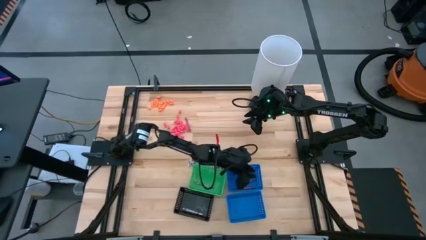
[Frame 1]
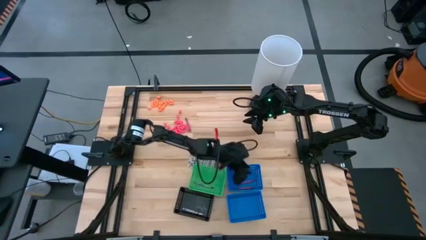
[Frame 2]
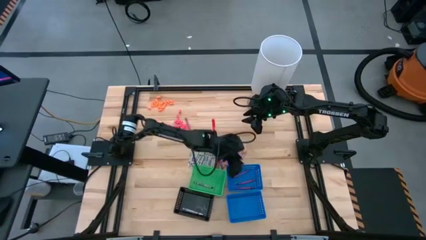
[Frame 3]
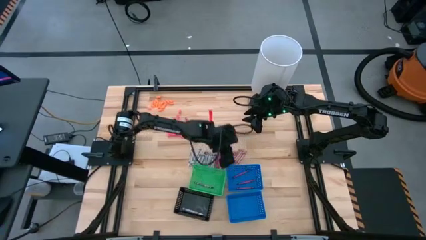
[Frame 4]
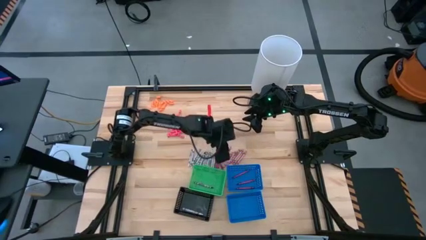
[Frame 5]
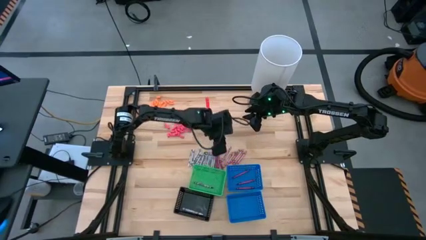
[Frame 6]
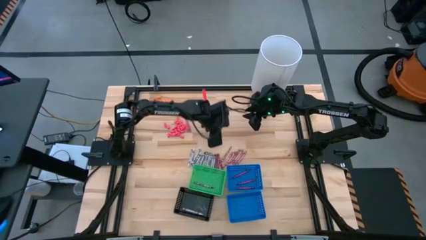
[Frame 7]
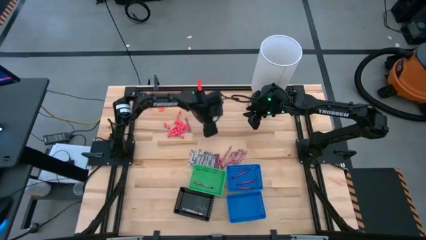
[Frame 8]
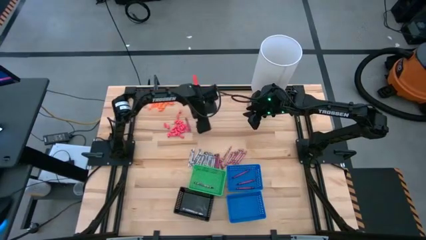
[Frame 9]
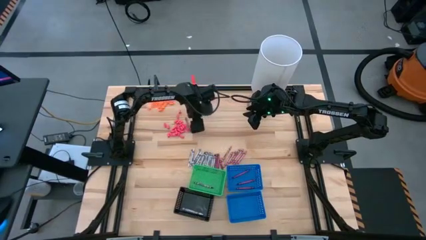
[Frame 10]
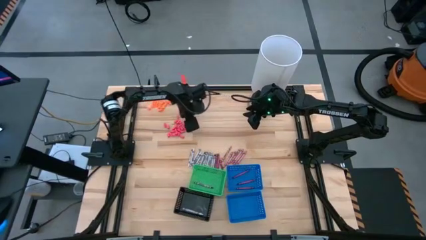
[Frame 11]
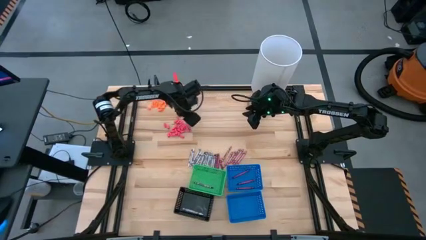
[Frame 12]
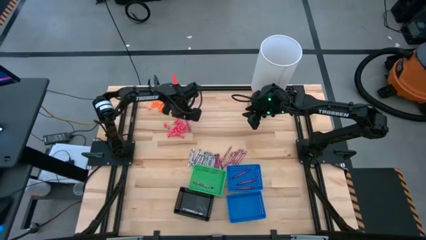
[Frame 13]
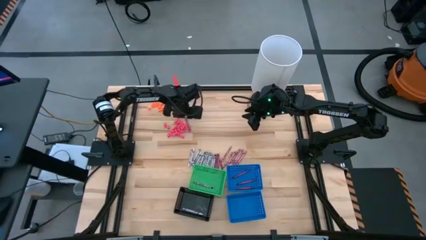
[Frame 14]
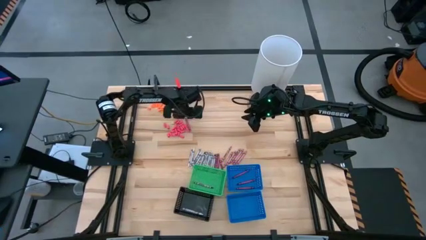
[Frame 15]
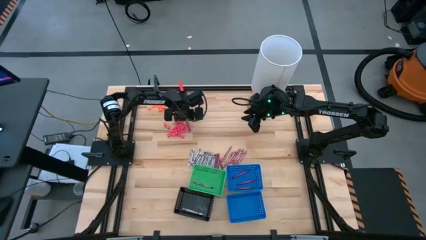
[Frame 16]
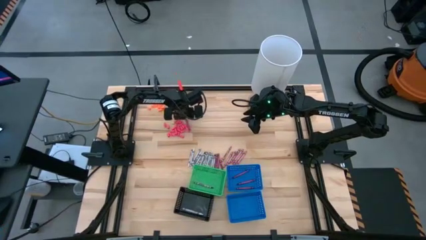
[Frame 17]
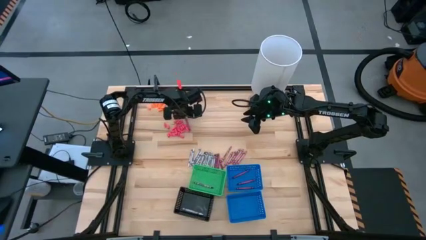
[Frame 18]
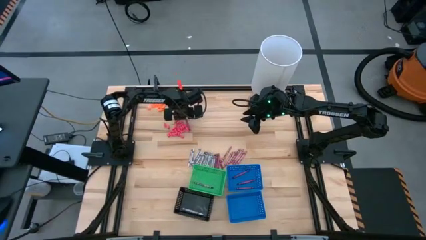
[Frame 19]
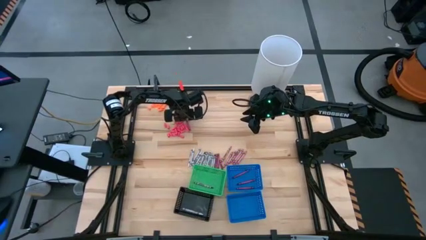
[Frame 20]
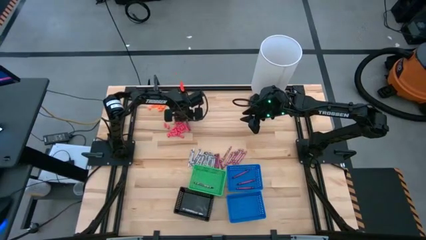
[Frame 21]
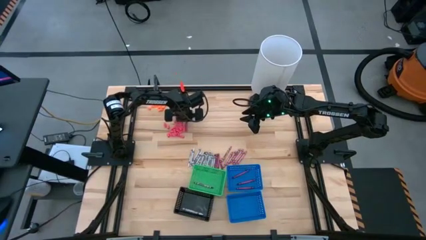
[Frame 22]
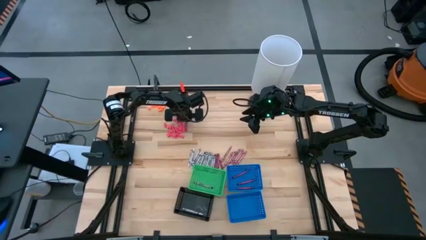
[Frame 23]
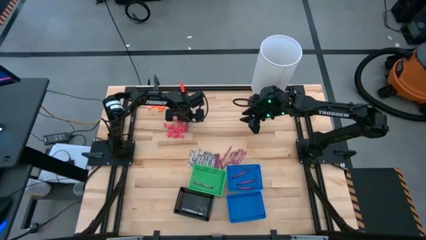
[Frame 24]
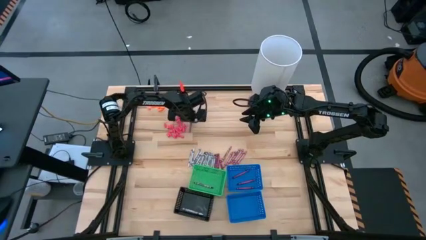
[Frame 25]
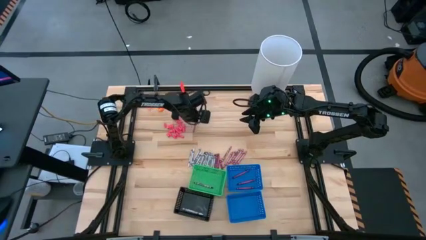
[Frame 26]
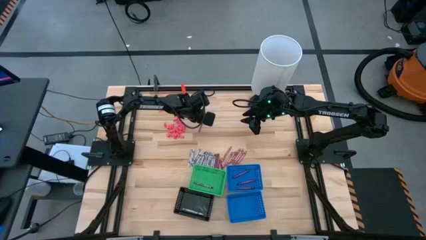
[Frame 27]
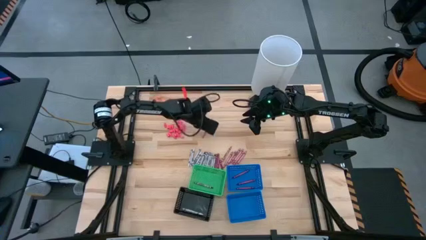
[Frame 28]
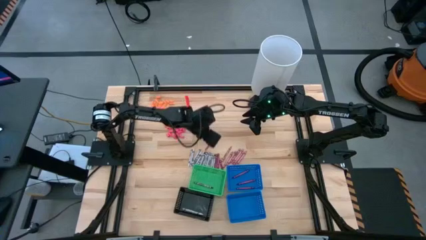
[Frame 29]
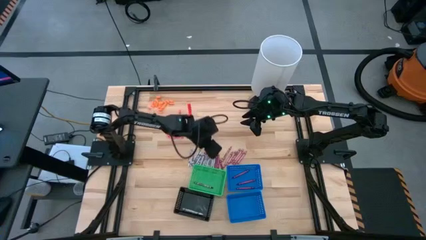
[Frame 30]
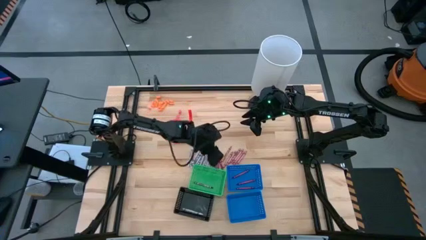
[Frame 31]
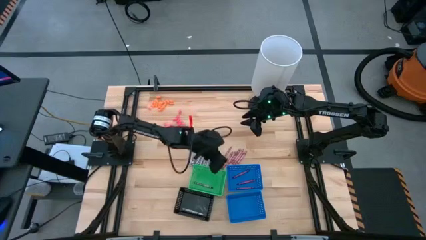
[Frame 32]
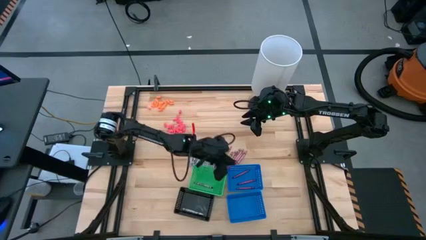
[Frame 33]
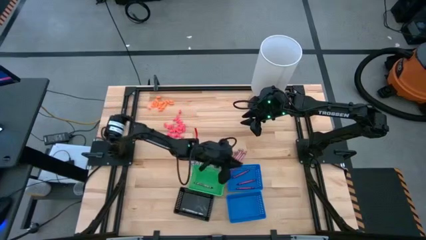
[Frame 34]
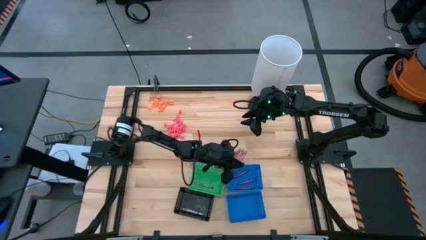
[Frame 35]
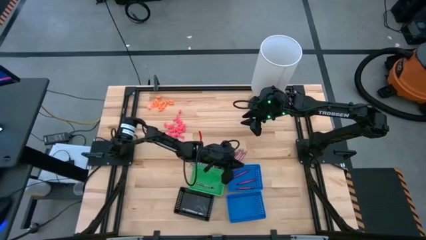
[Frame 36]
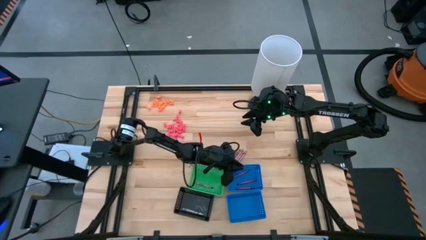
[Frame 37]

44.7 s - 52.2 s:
Task: Sort crayons
Put the violet crayon into the top blue bin

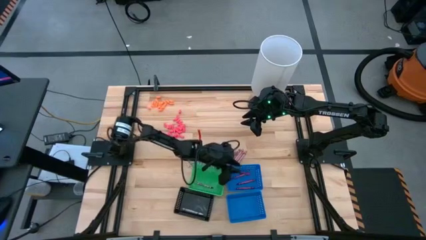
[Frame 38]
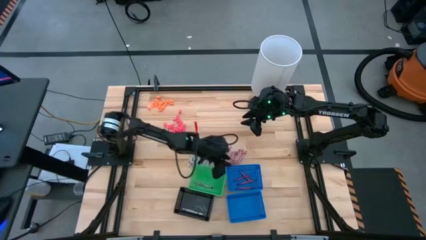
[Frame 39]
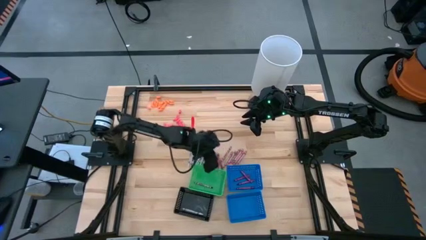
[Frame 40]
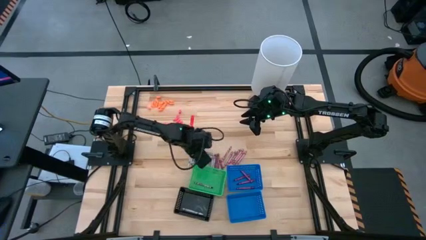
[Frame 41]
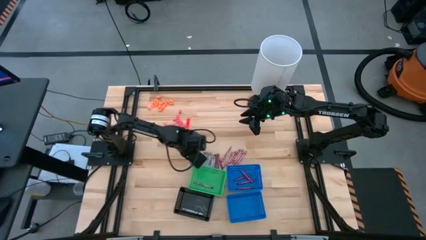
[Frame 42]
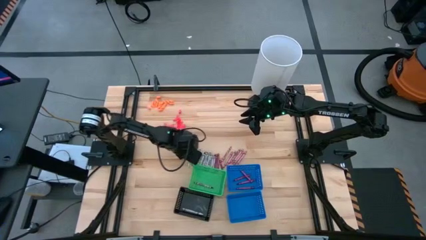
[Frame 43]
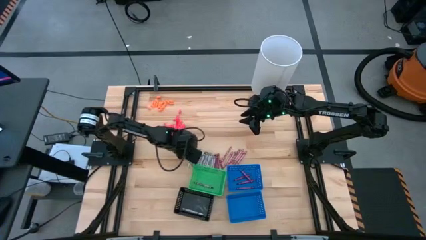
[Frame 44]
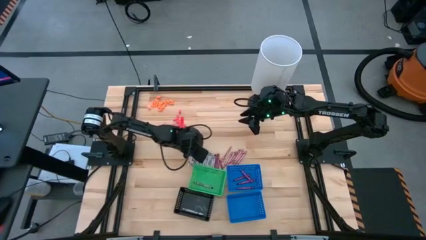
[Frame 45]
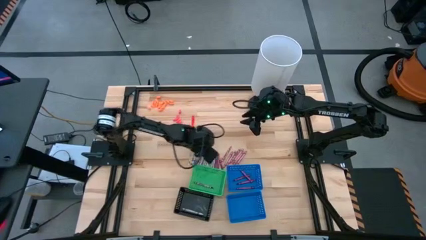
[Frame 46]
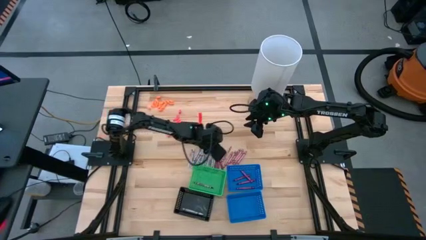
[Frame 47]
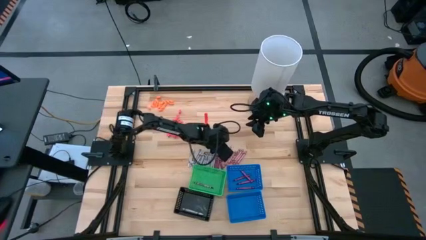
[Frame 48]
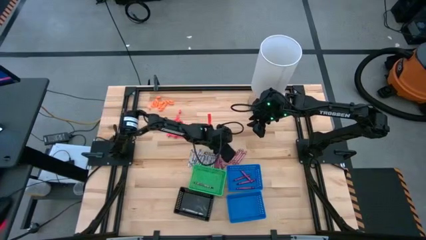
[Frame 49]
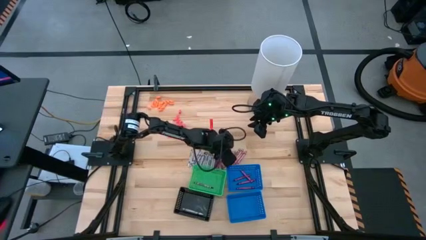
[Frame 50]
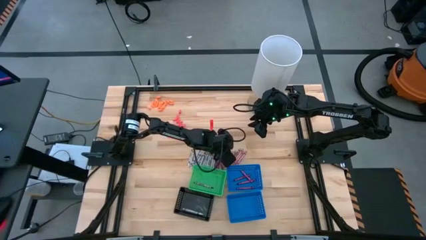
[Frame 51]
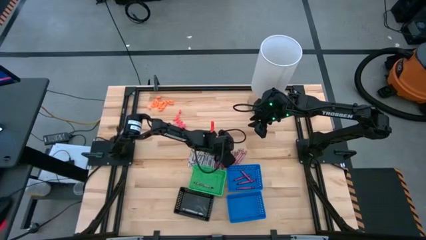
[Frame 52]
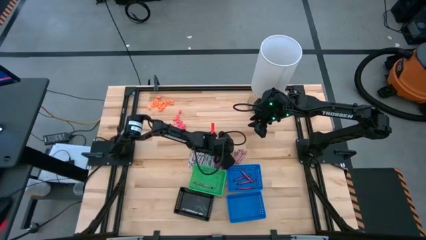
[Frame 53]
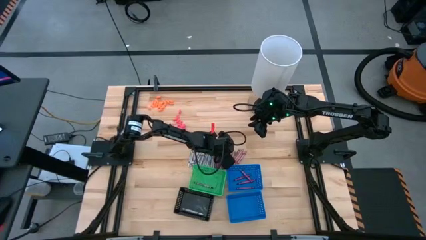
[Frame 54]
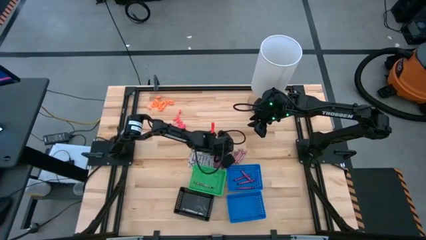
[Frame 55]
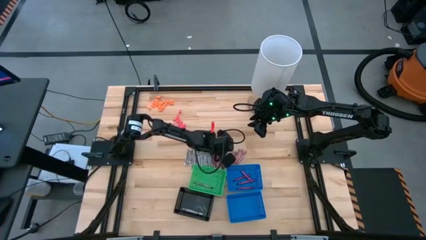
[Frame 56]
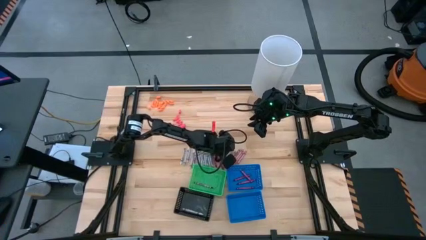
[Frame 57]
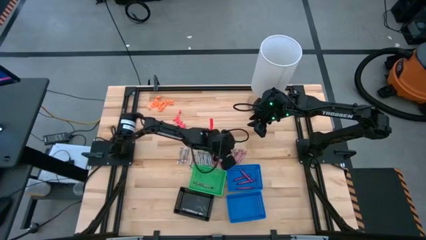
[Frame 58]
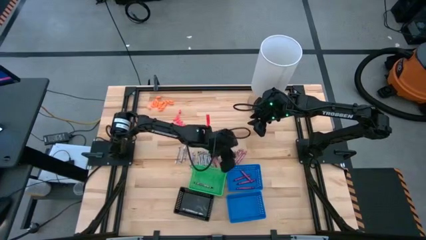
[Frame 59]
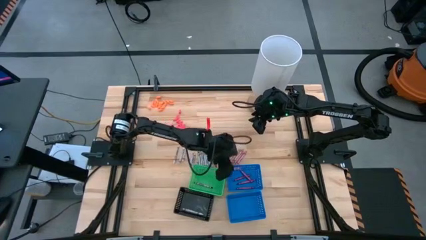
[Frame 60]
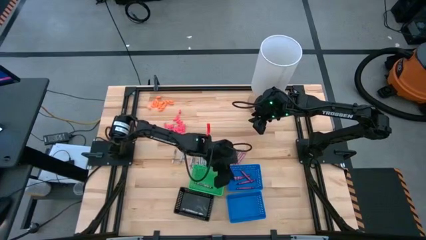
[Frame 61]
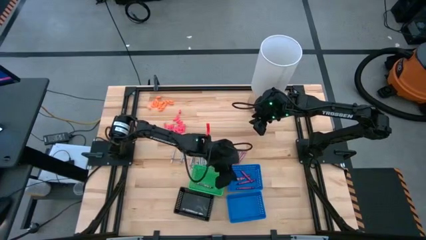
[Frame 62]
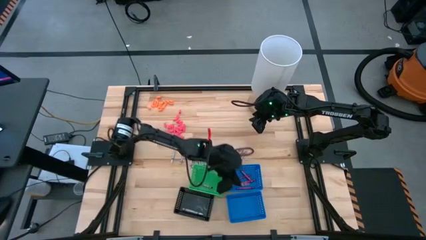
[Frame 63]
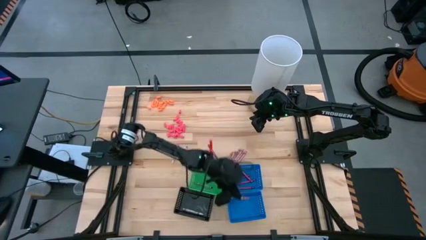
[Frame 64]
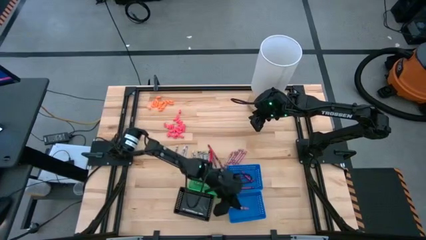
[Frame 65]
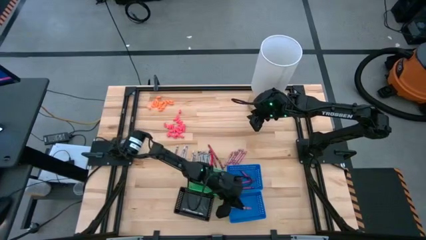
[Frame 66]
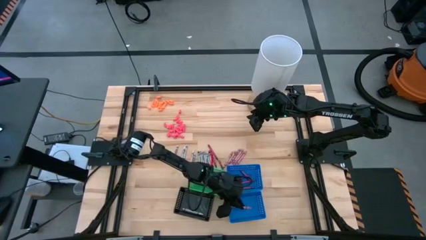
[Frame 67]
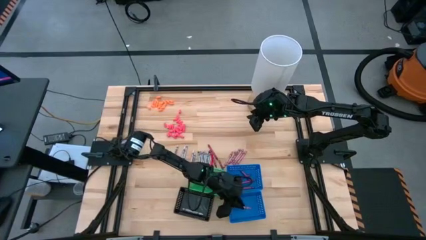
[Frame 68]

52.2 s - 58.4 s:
Put the pink crayon into the bottom blue bin

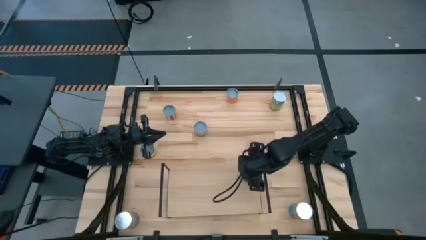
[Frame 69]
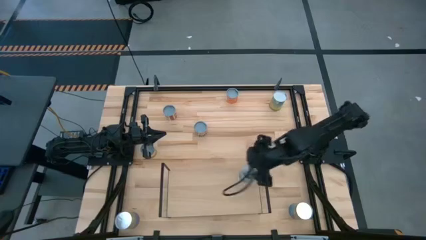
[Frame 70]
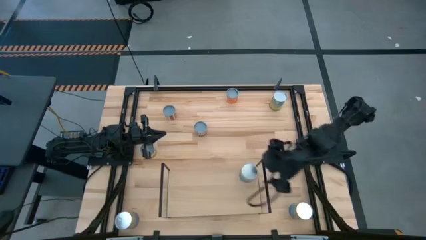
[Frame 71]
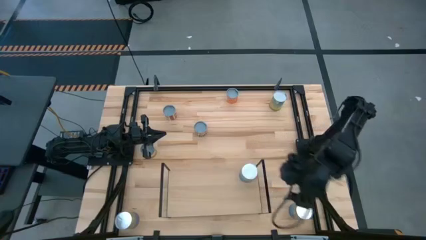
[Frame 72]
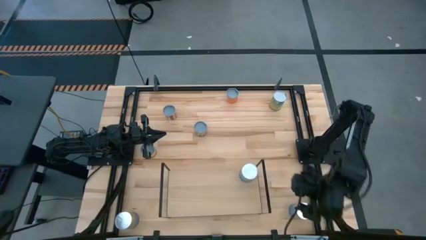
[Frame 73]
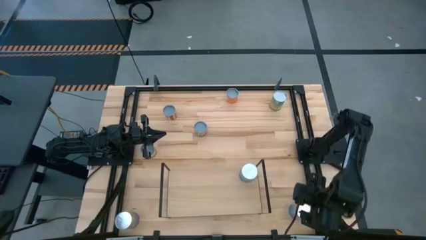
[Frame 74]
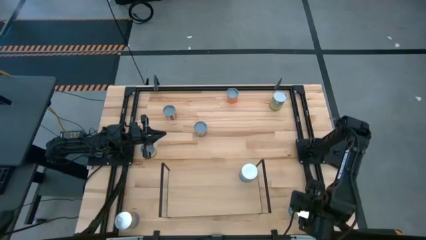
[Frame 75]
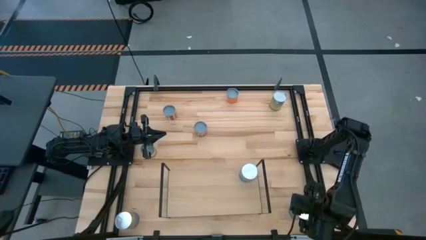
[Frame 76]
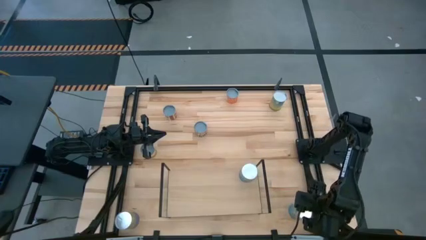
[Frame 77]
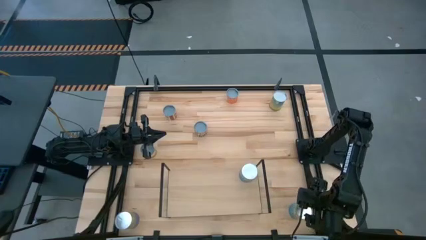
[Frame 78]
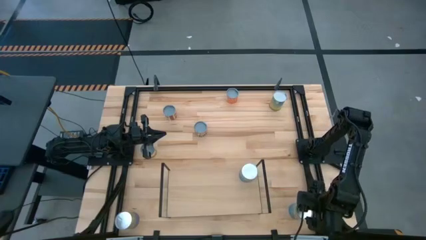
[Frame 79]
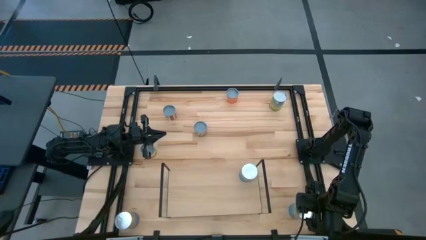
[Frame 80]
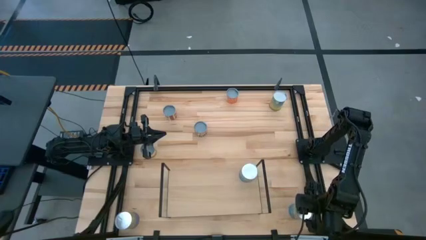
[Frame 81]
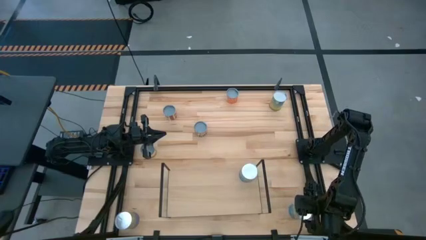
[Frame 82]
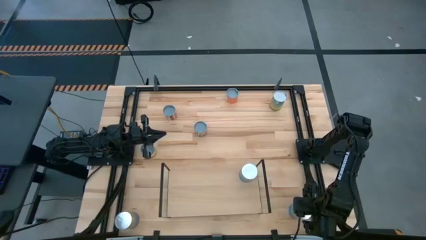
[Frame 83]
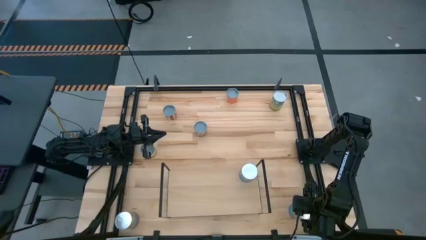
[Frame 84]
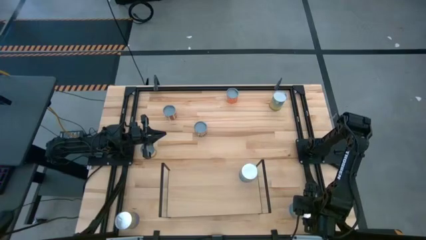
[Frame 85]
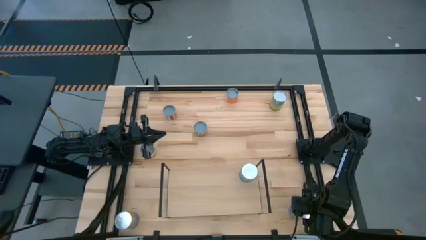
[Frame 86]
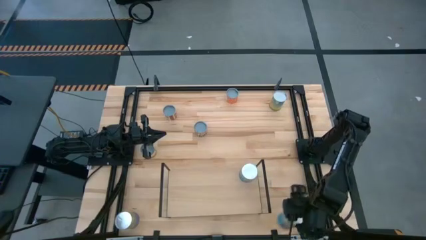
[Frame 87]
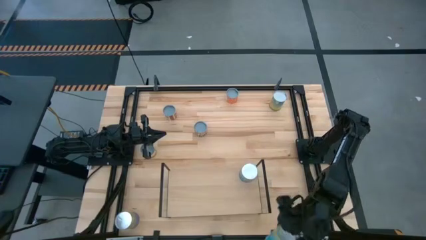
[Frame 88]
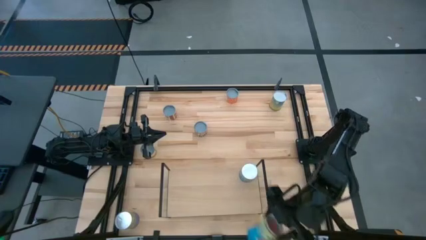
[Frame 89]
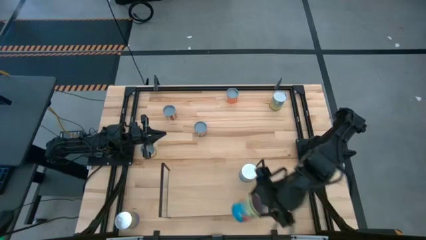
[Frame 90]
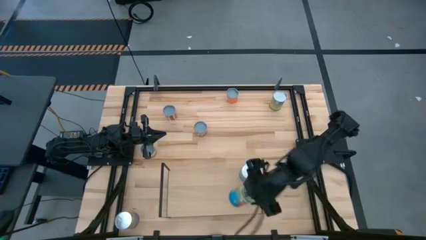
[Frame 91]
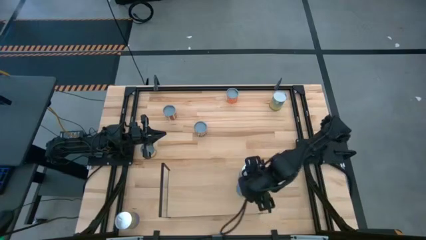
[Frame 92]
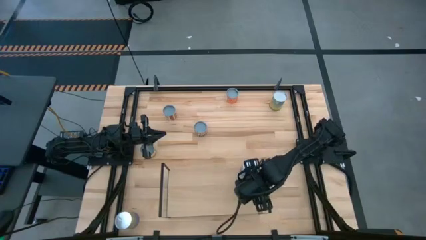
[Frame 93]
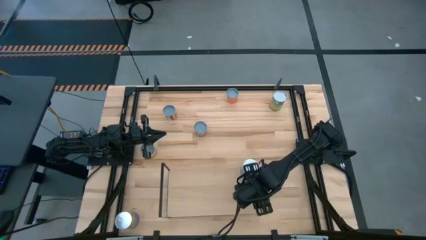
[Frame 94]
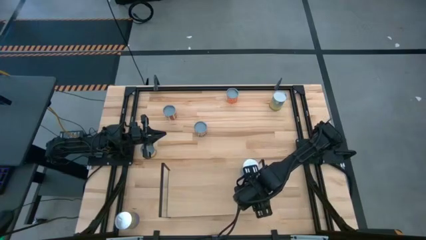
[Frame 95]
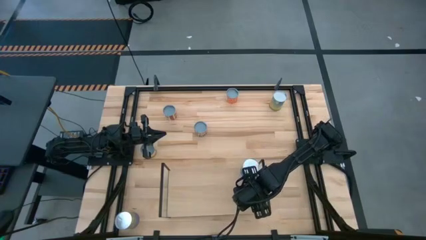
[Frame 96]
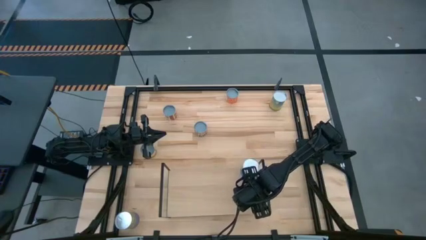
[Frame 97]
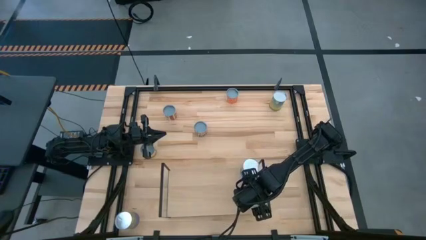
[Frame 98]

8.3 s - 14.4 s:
Task: Pick and place cans onto a shelf
Put the canned tomatoes on the shelf
